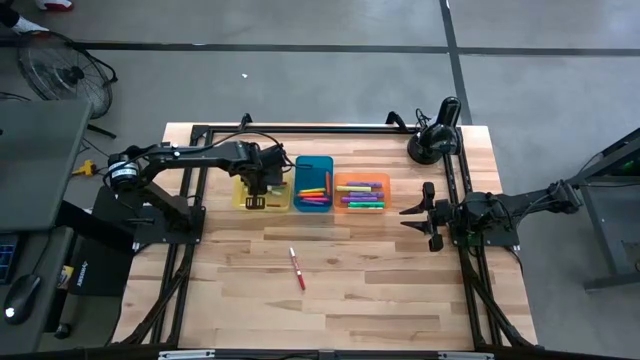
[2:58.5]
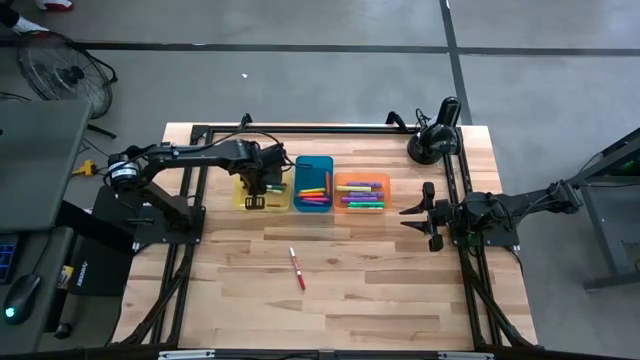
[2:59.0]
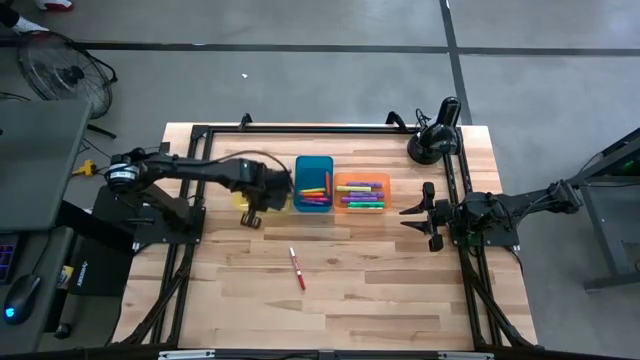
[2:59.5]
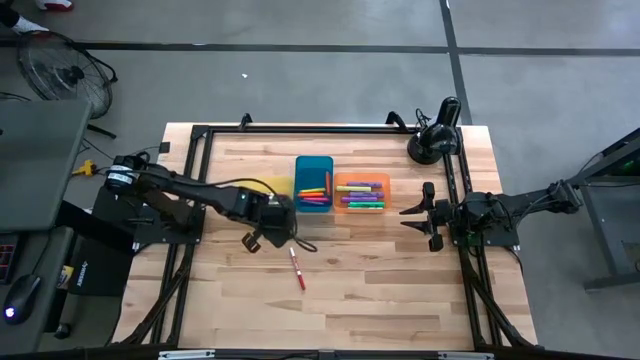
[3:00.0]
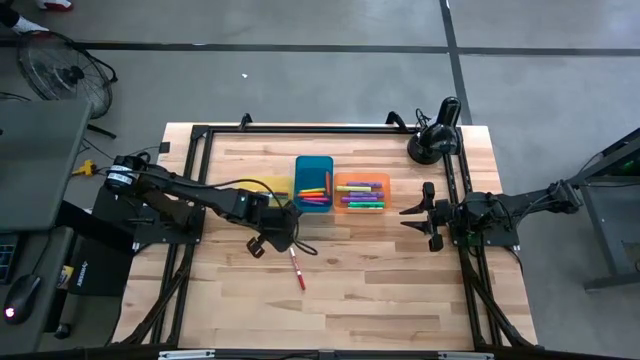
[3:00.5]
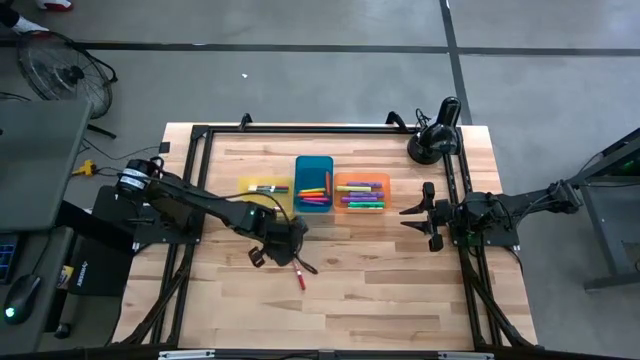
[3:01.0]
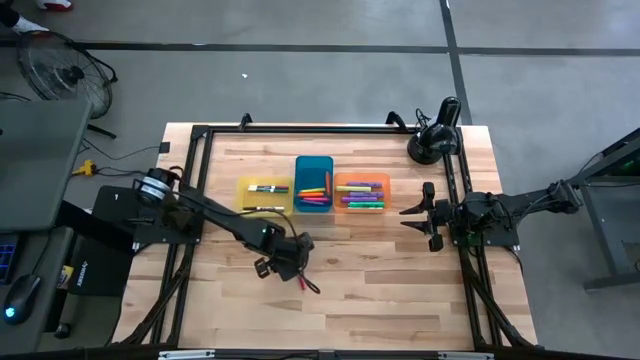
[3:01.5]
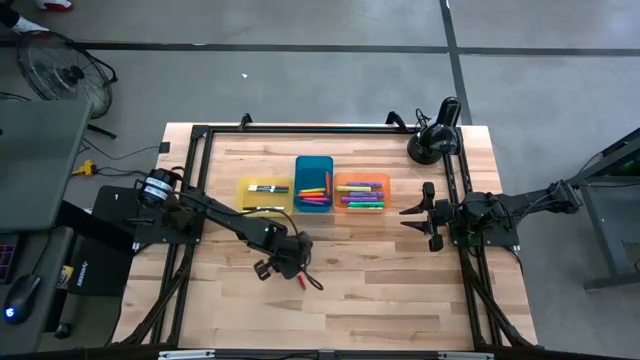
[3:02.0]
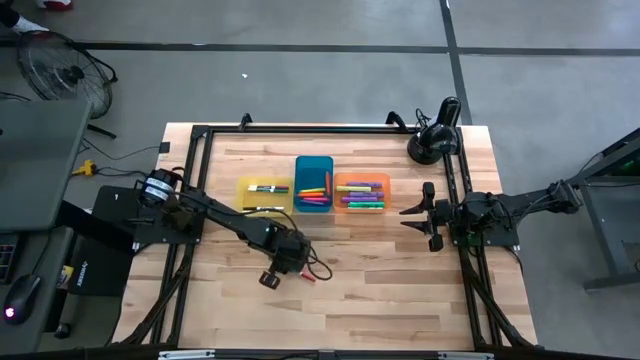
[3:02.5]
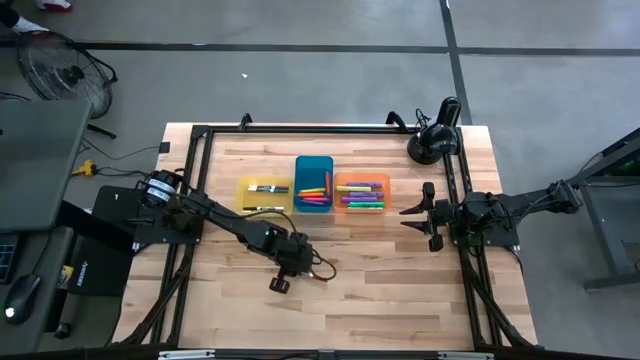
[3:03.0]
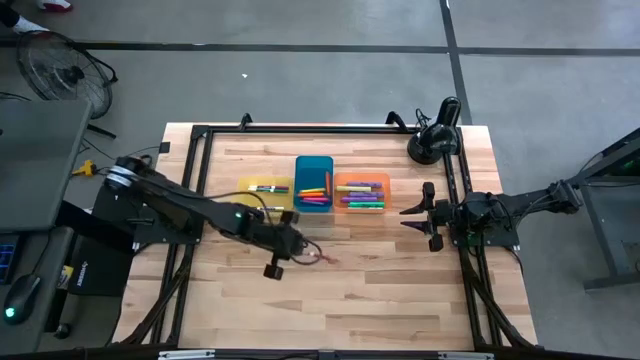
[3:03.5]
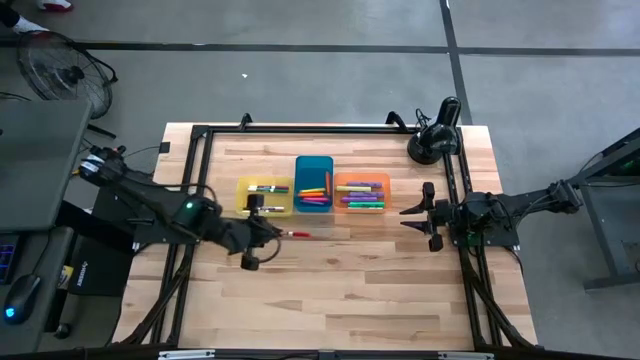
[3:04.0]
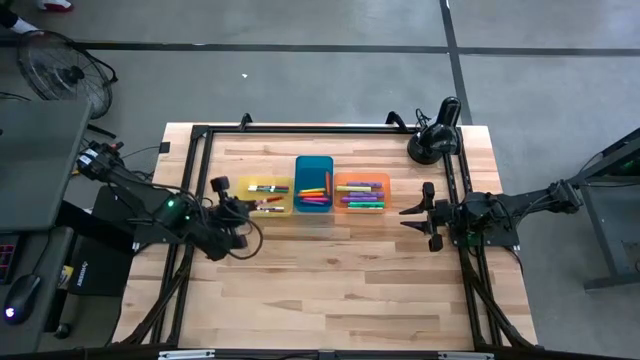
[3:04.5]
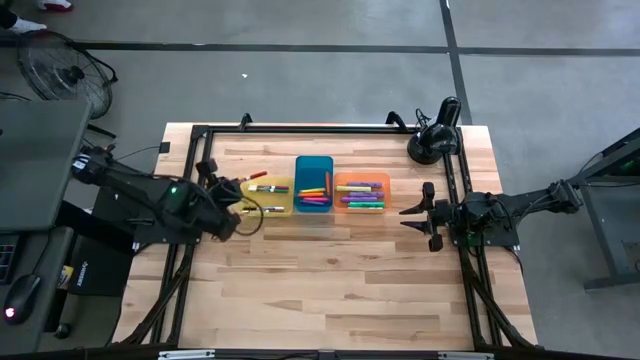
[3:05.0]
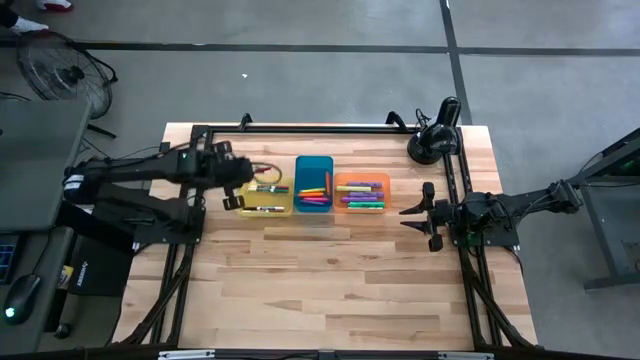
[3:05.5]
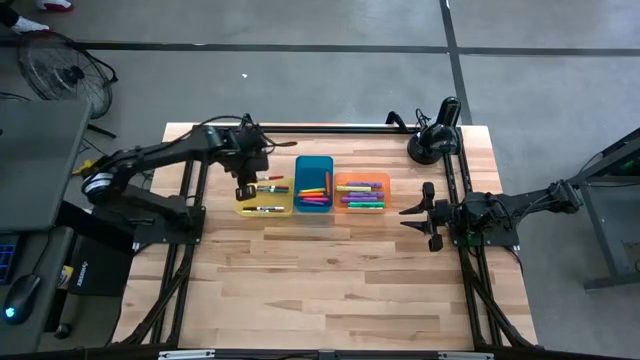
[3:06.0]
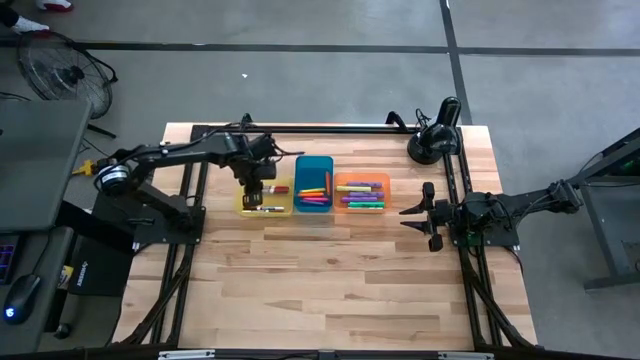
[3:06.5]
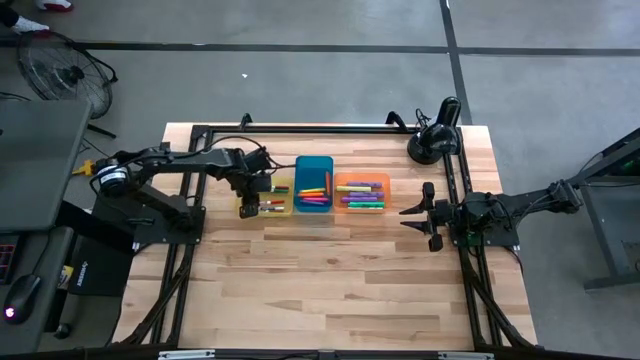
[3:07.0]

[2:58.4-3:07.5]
Task: Pick & Place Markers
Put the red dry erase marker into the yellow bin

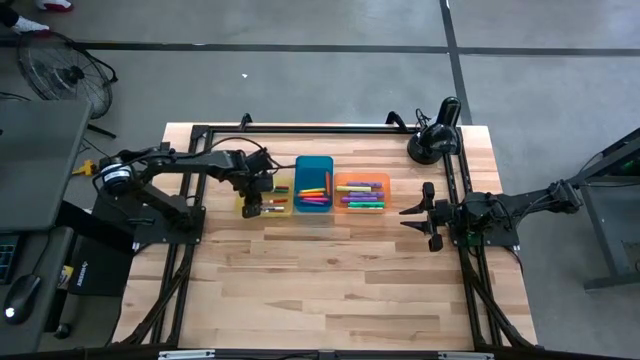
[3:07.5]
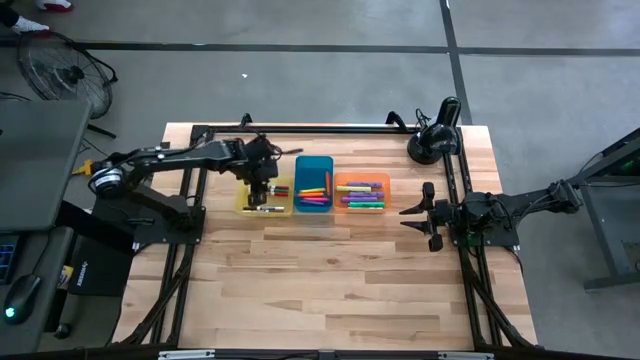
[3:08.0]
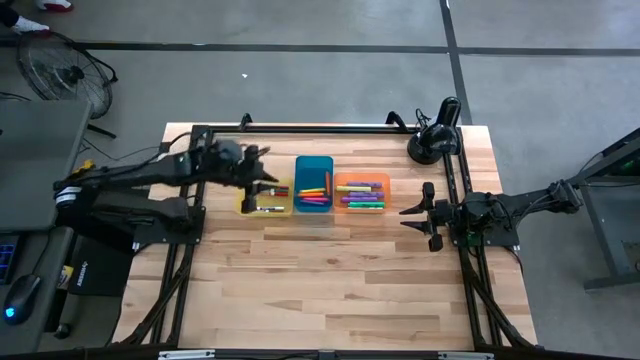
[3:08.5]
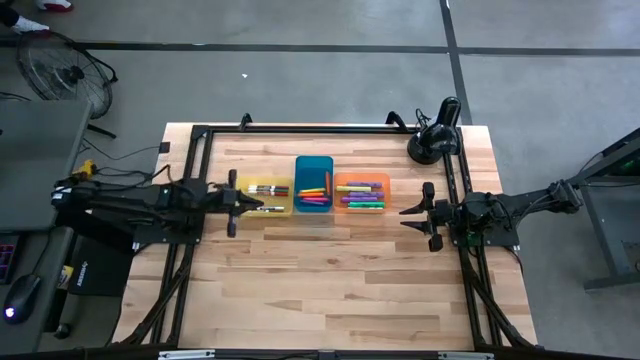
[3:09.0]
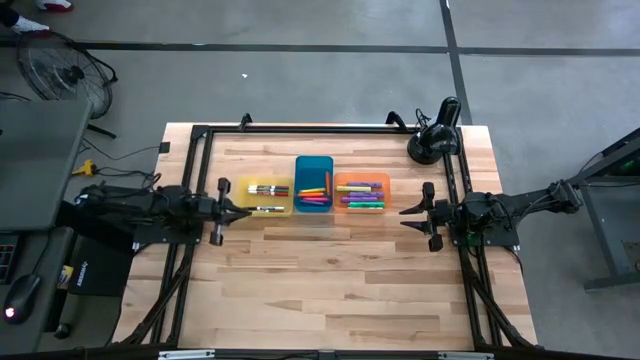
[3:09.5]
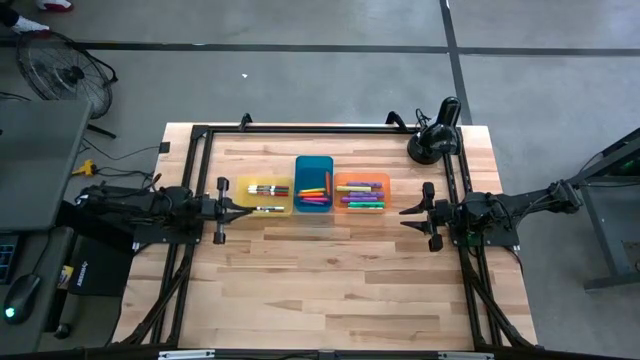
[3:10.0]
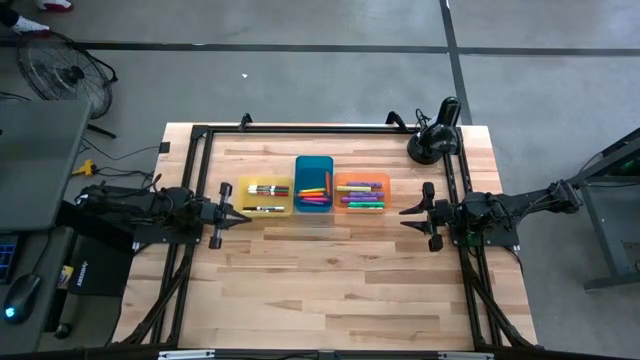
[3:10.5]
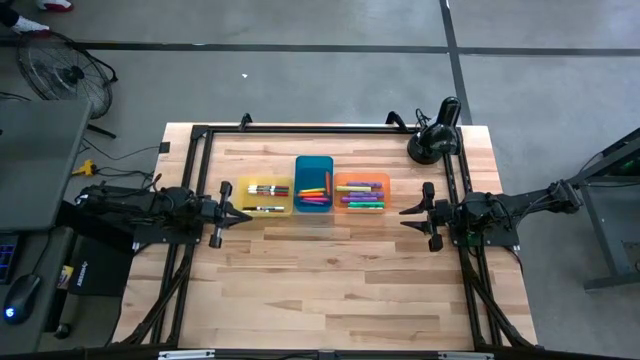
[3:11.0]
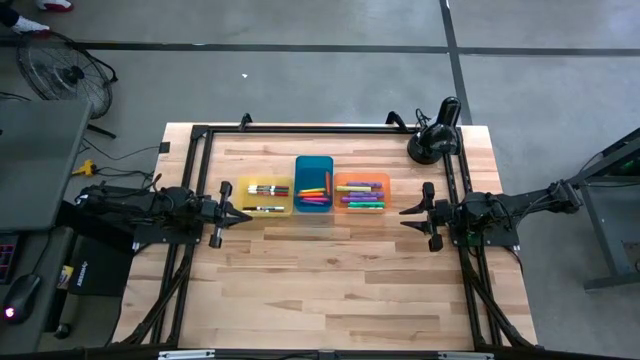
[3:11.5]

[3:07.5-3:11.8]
Return to Home Position

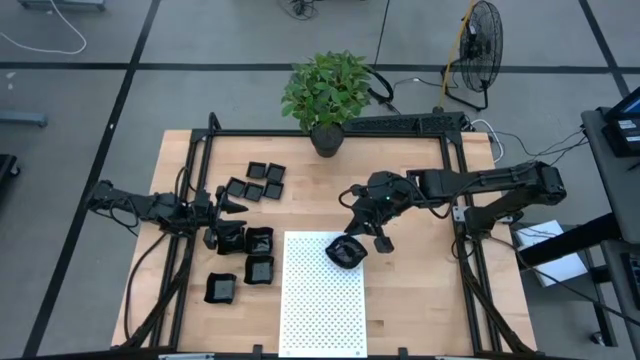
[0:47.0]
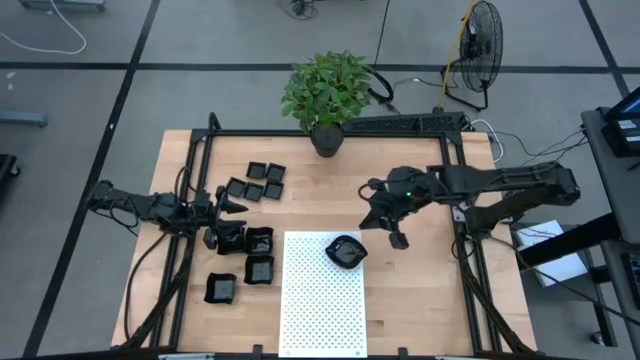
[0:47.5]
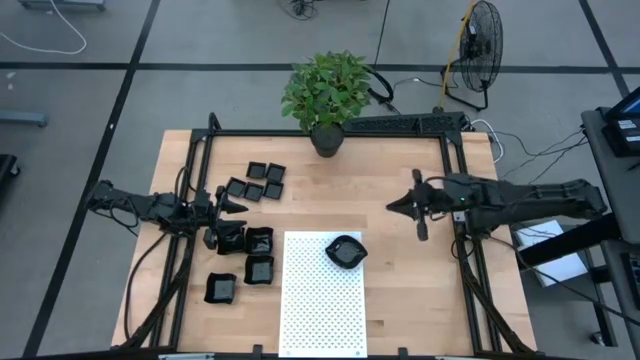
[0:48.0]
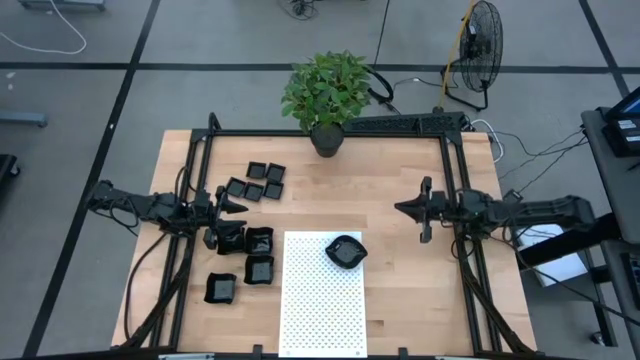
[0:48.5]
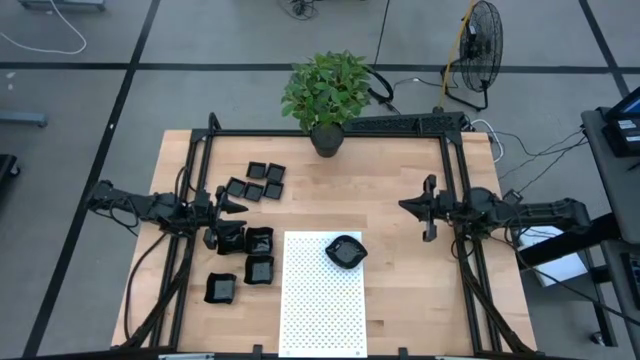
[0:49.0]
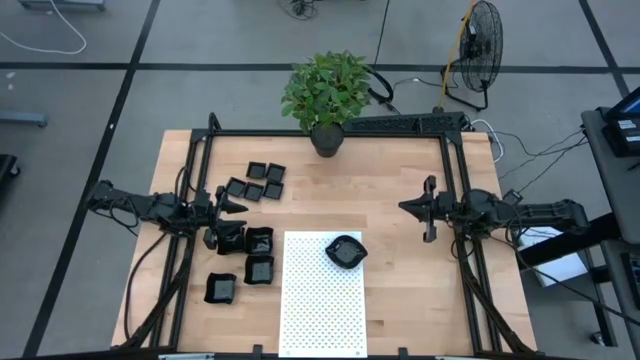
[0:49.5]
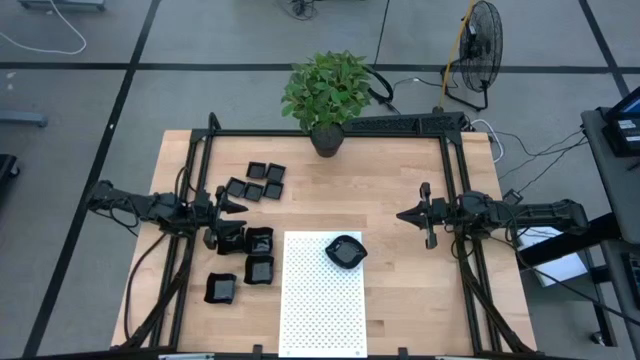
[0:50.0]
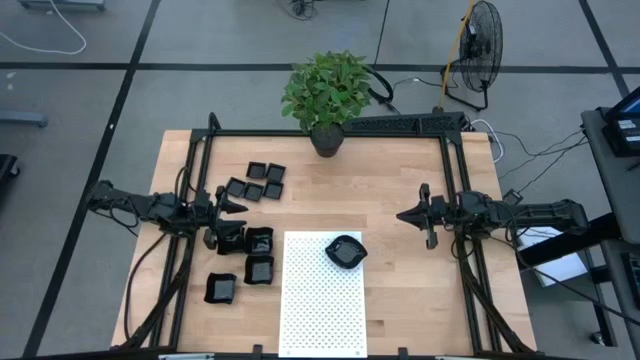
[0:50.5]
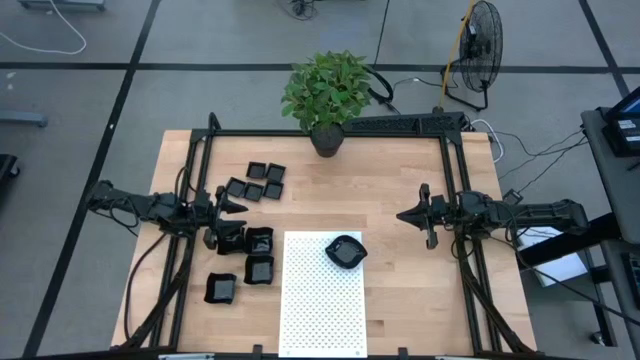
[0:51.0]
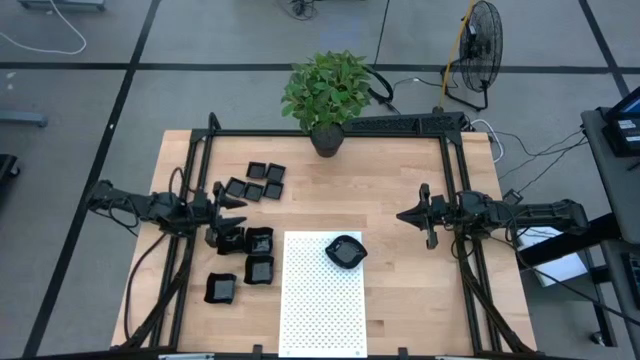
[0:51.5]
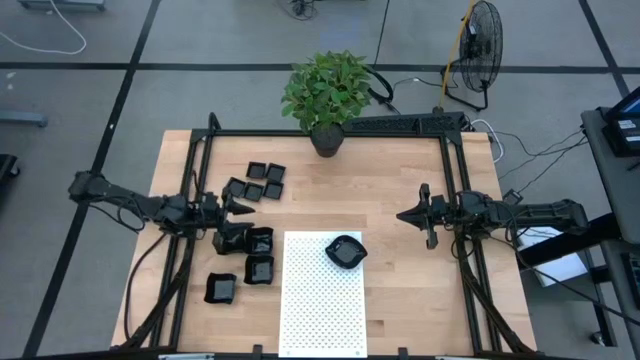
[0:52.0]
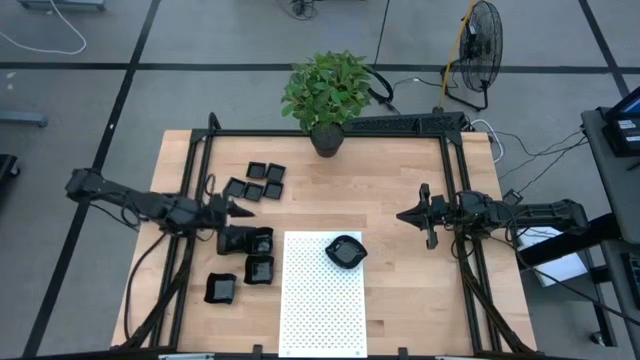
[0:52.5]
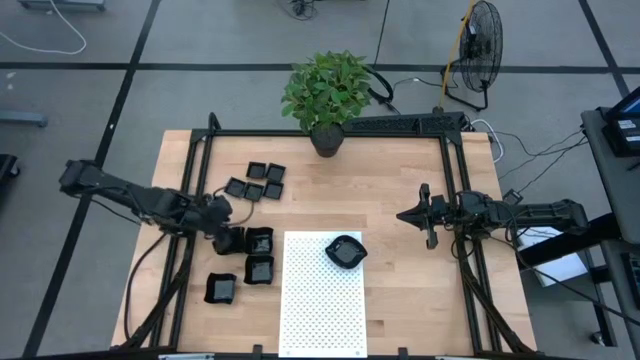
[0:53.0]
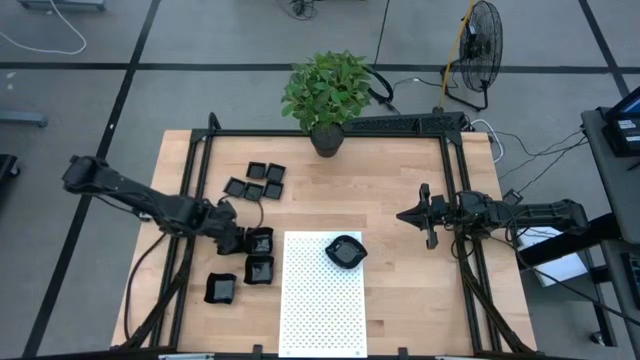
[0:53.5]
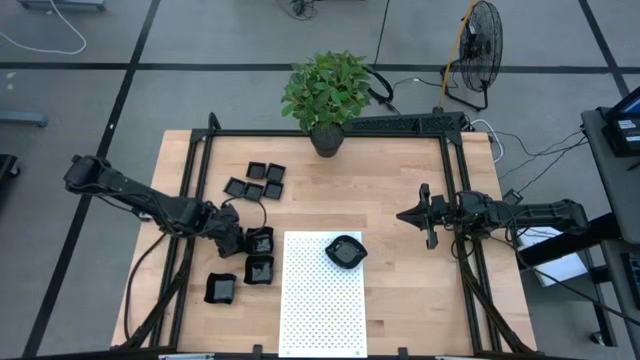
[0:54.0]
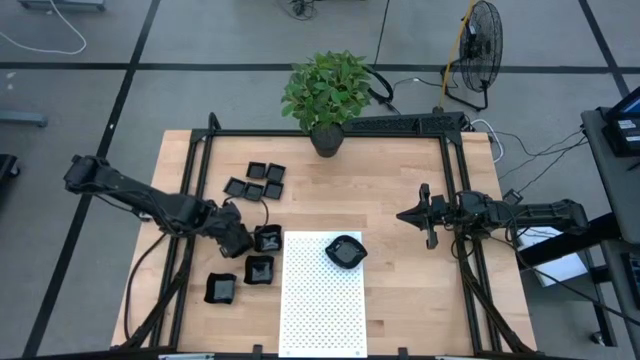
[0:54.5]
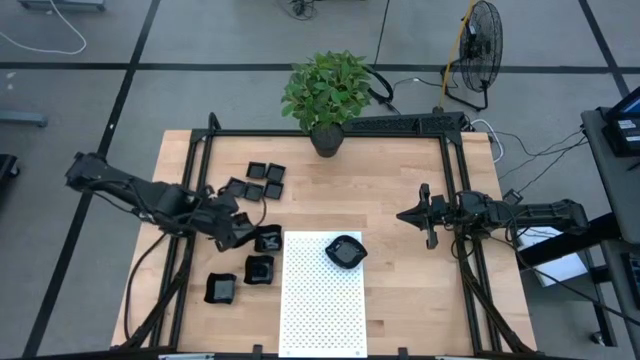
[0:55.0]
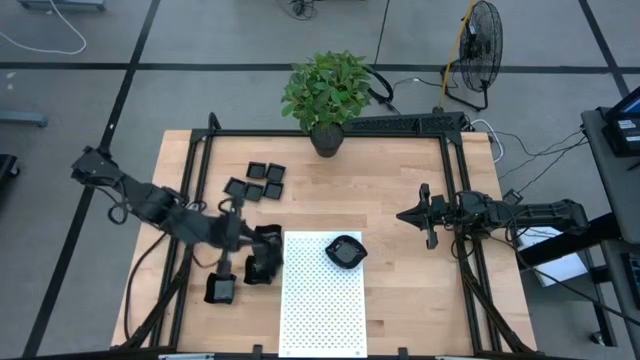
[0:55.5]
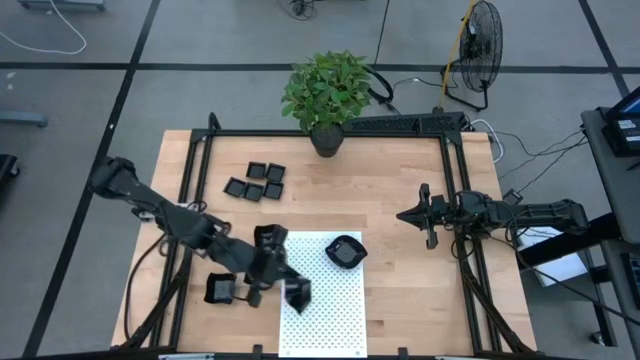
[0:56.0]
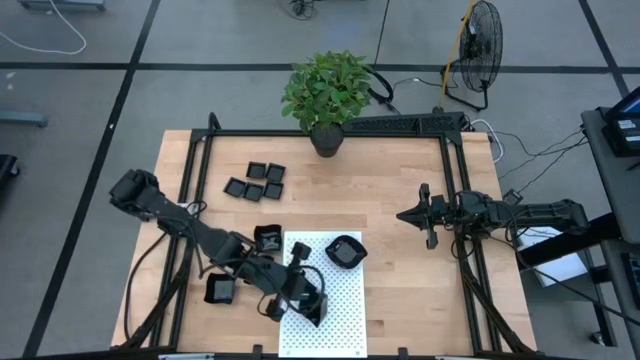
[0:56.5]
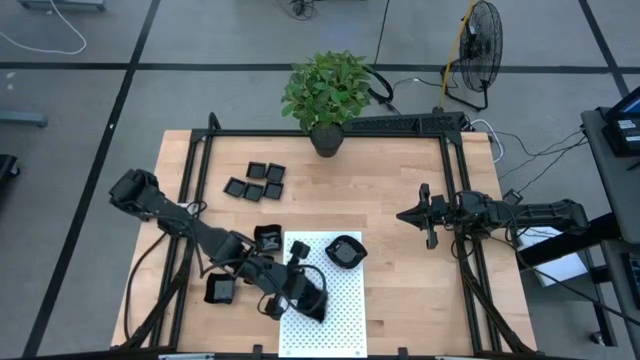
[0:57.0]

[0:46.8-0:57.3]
Task: Pick & Place Mini shaped plates
Put the distorted square plate on the shelf
